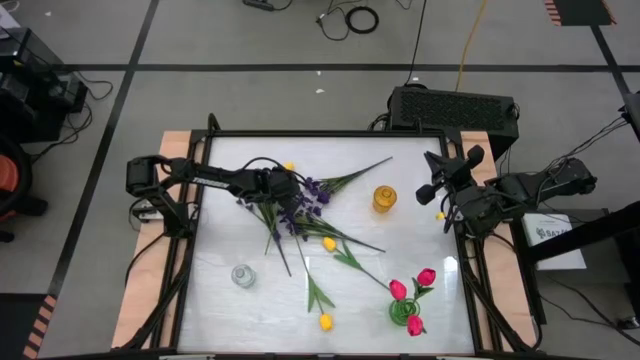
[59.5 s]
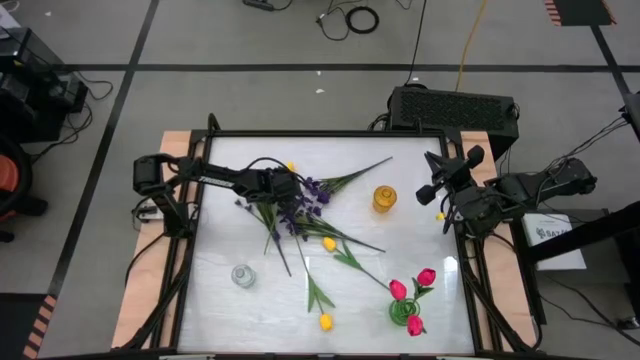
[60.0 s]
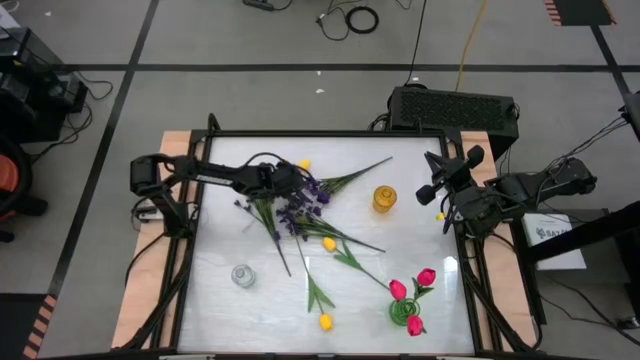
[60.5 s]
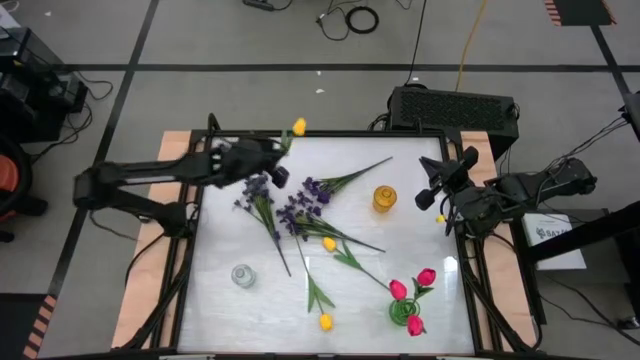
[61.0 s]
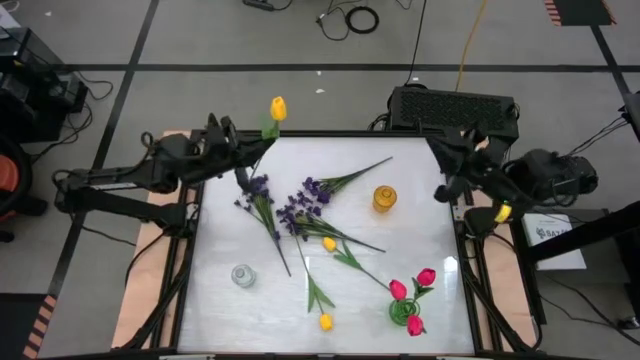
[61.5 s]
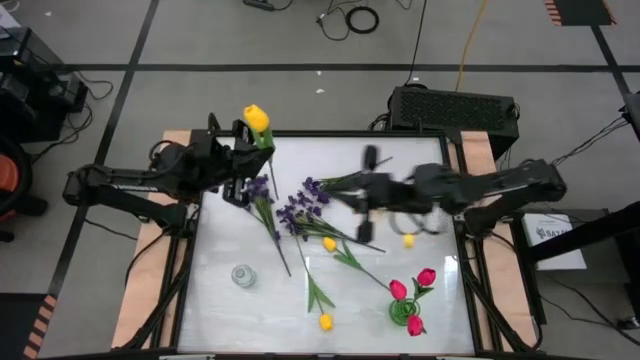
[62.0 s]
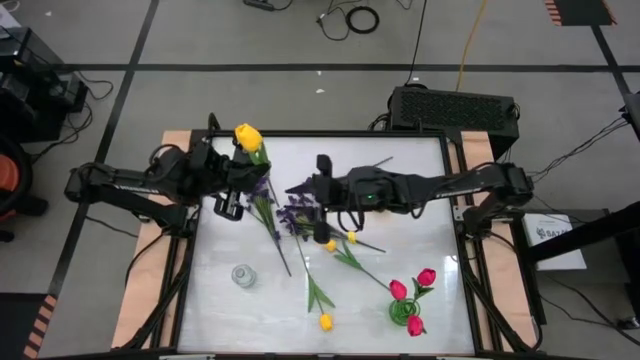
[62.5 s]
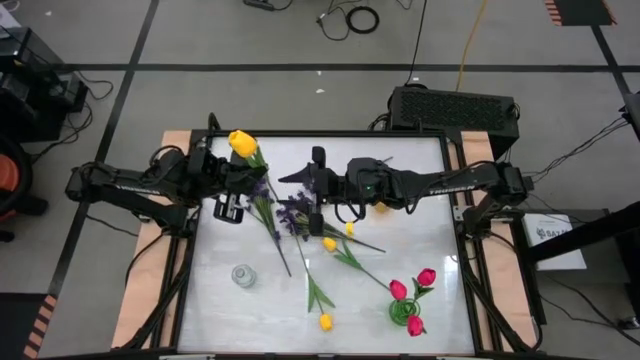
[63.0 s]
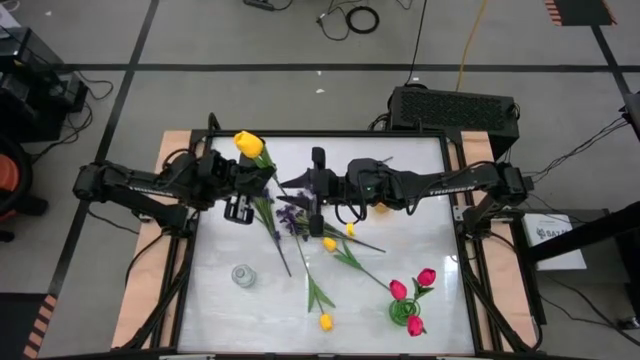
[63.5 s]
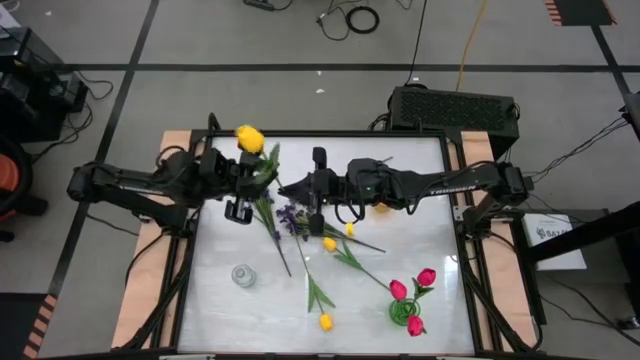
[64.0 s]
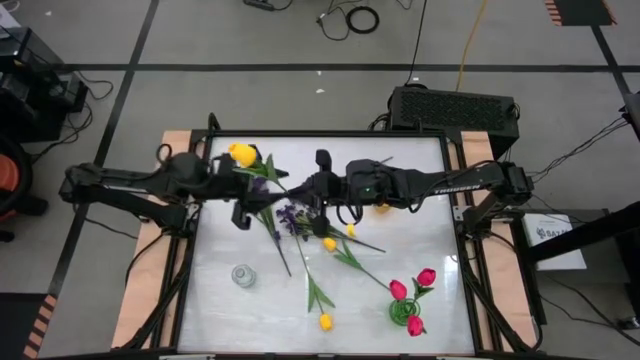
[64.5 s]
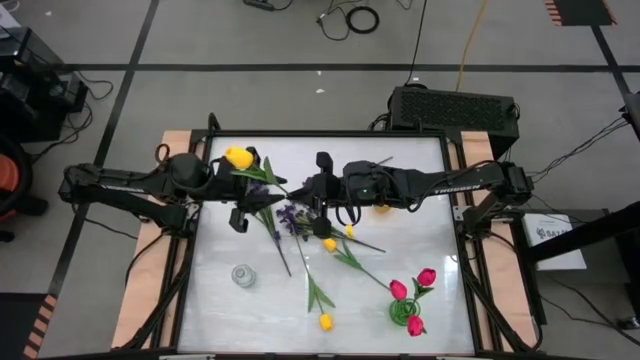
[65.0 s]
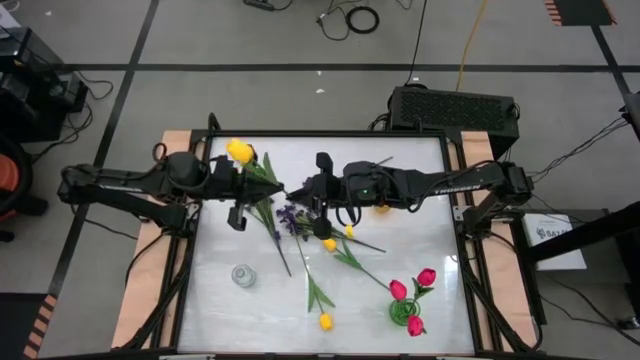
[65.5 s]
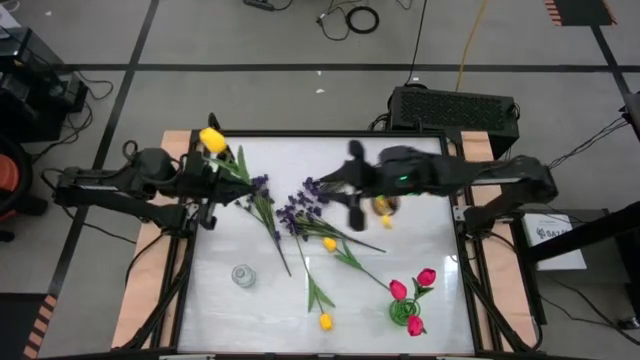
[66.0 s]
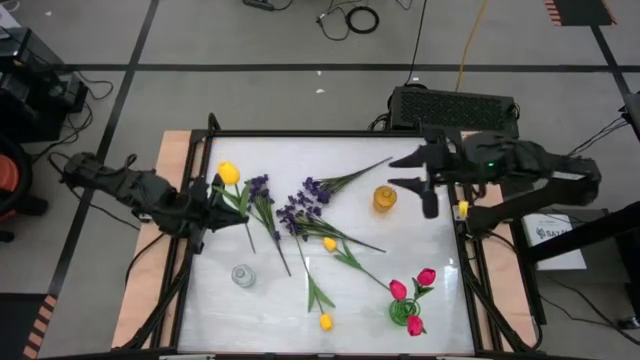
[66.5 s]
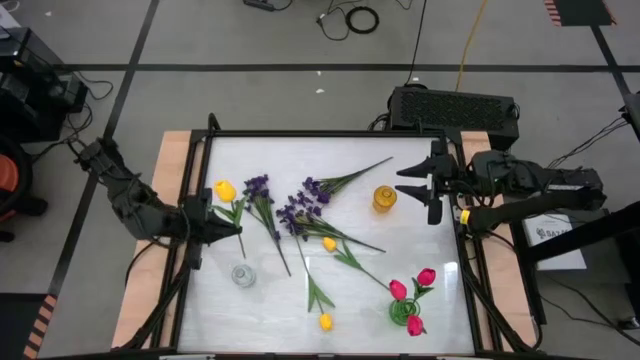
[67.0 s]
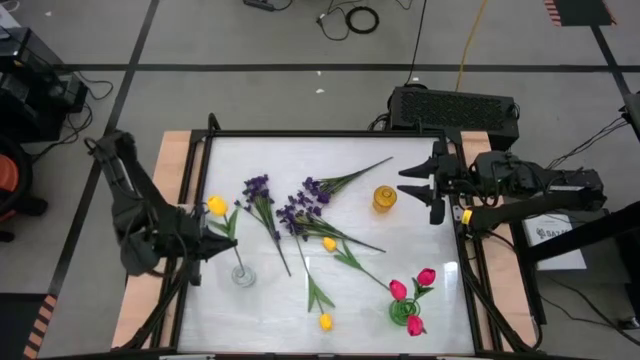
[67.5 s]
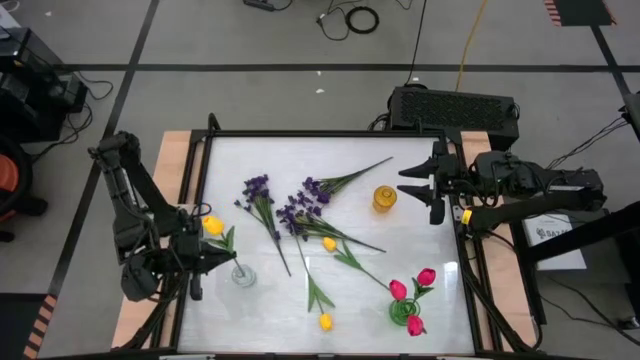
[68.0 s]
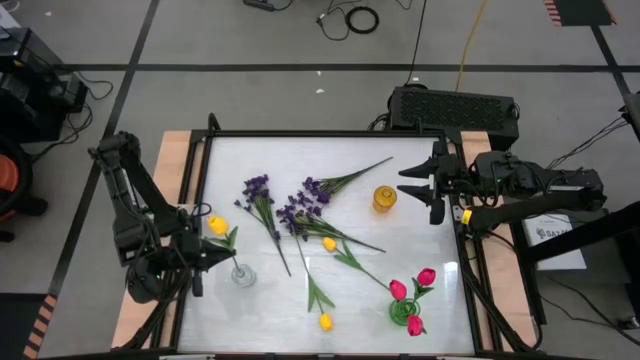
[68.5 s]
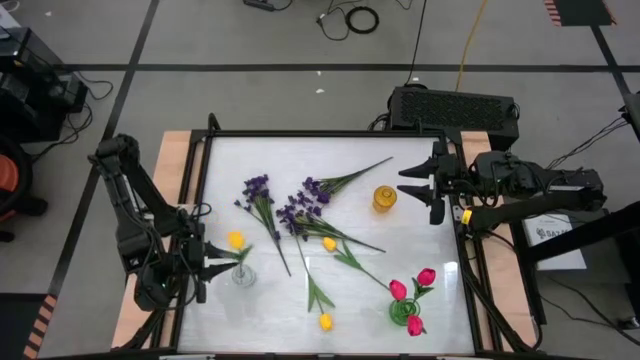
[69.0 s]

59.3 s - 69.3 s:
Task: Sort flowers into vase by color
Put the top left yellow flower into the transparent vase

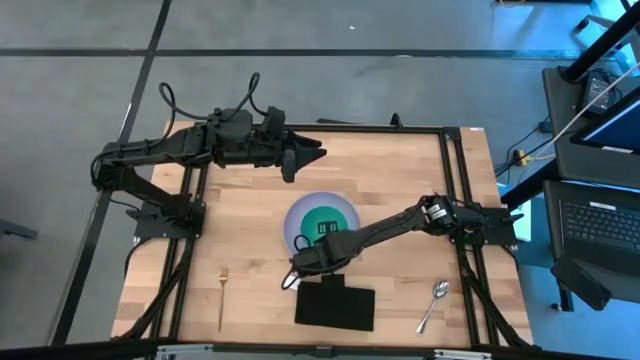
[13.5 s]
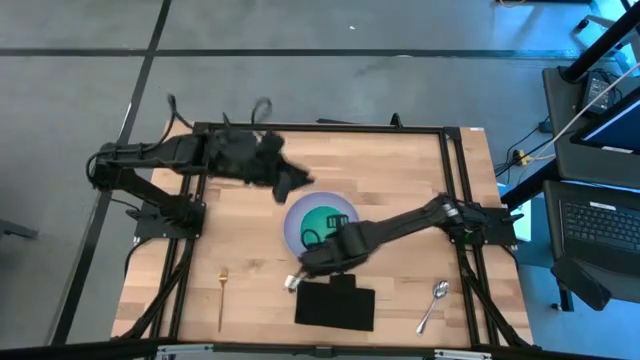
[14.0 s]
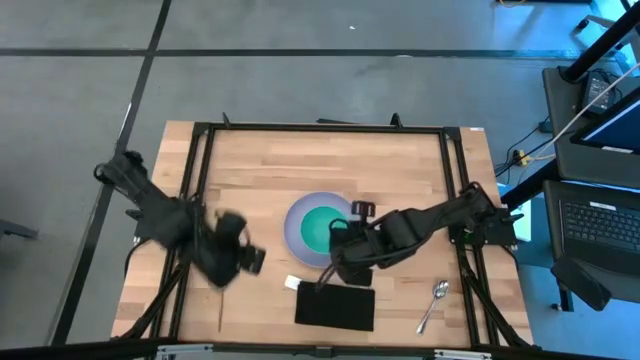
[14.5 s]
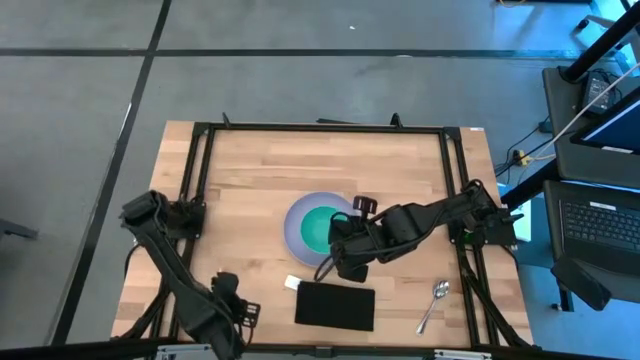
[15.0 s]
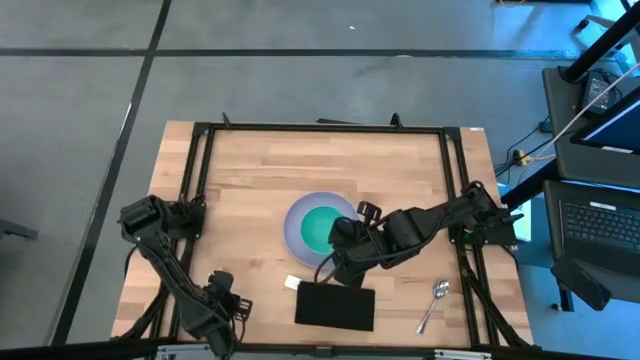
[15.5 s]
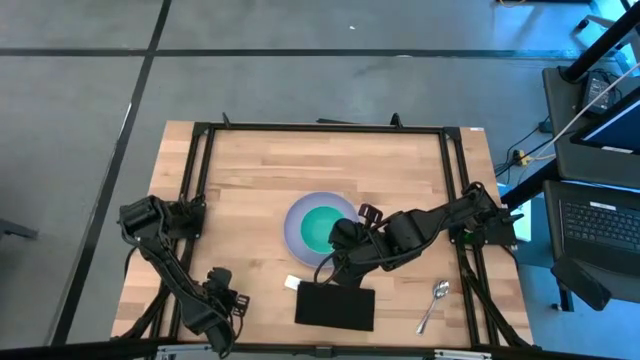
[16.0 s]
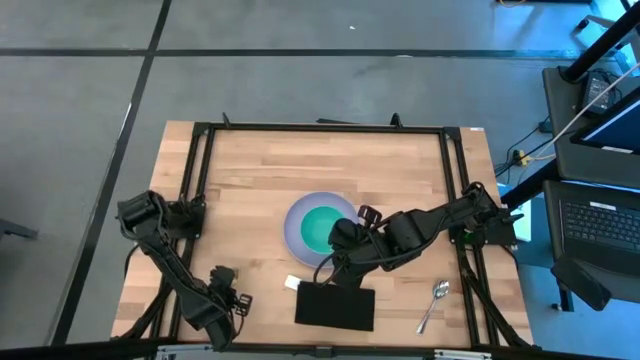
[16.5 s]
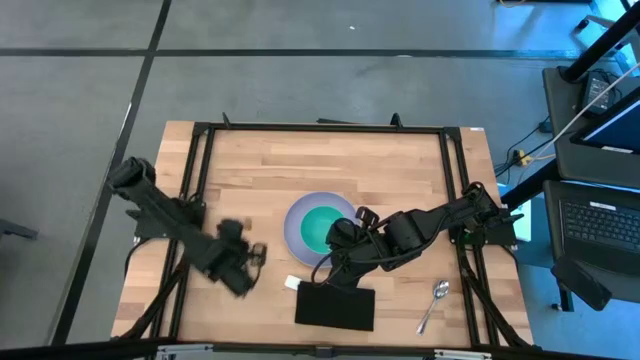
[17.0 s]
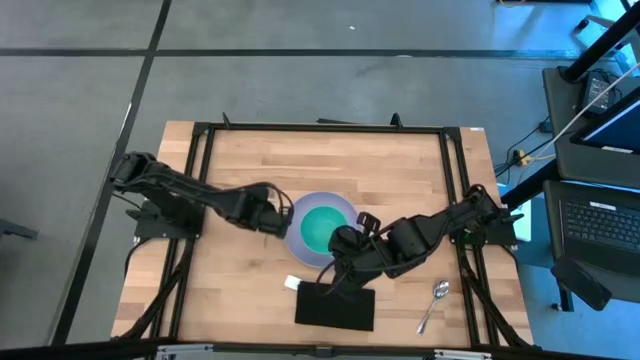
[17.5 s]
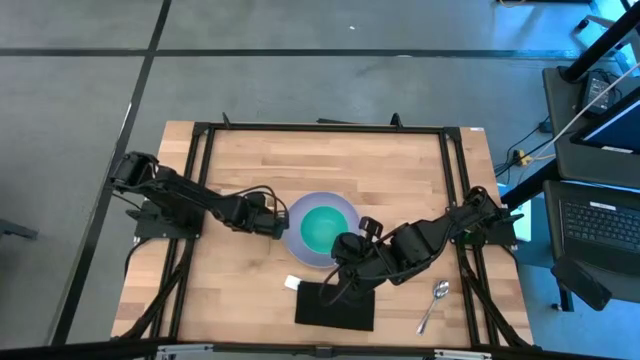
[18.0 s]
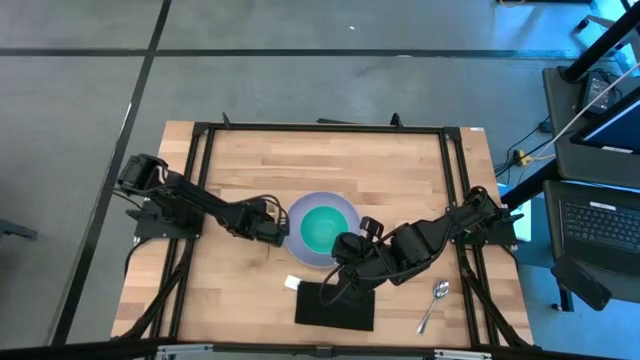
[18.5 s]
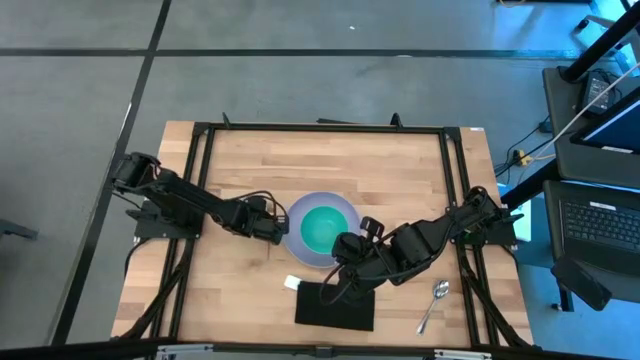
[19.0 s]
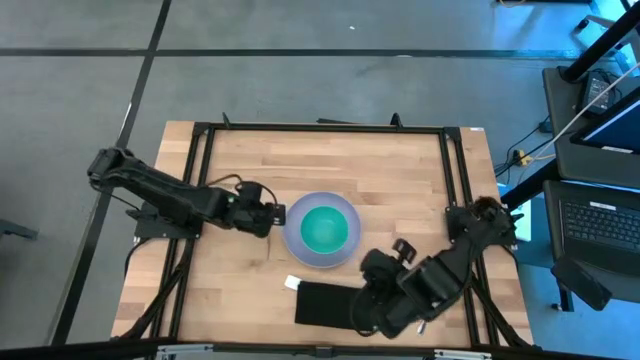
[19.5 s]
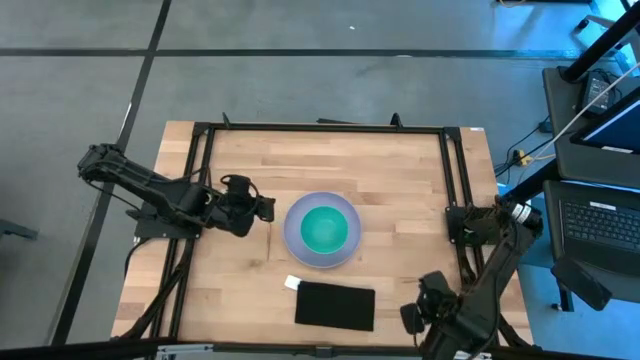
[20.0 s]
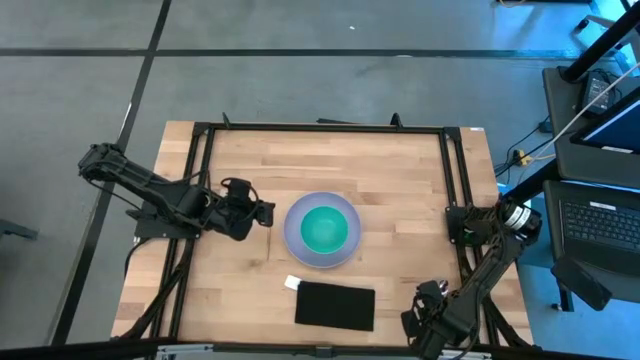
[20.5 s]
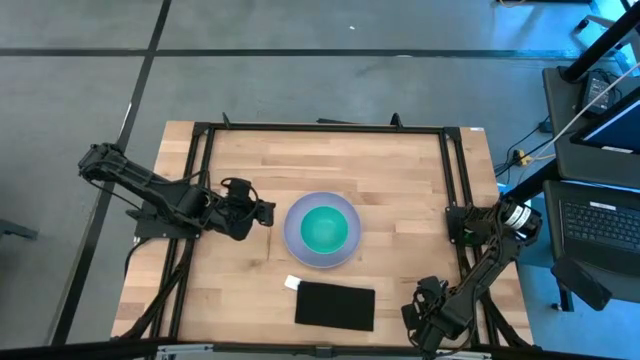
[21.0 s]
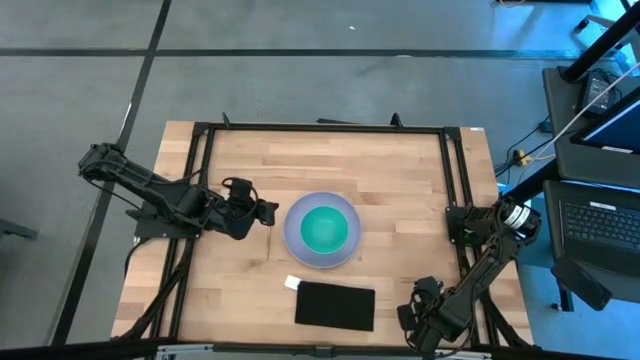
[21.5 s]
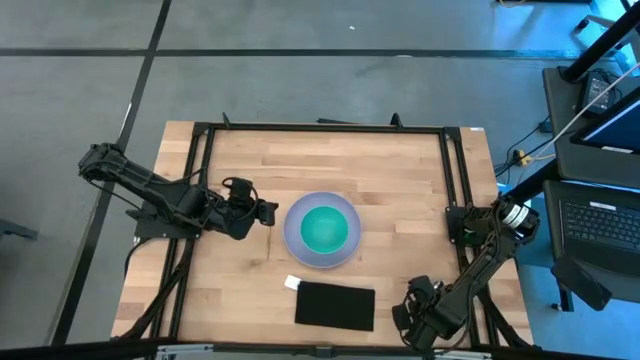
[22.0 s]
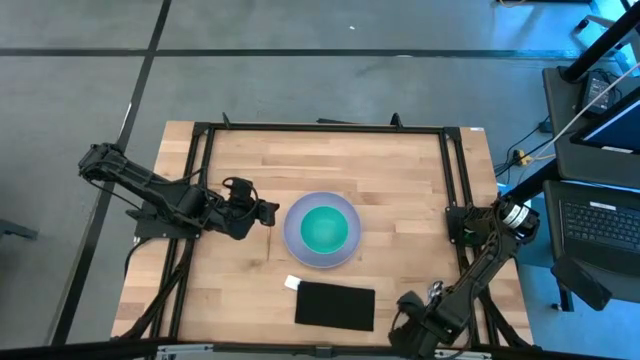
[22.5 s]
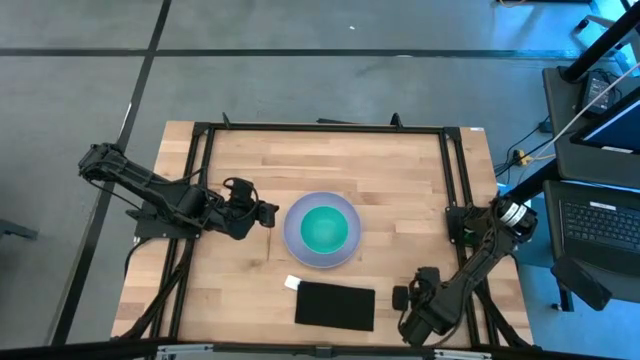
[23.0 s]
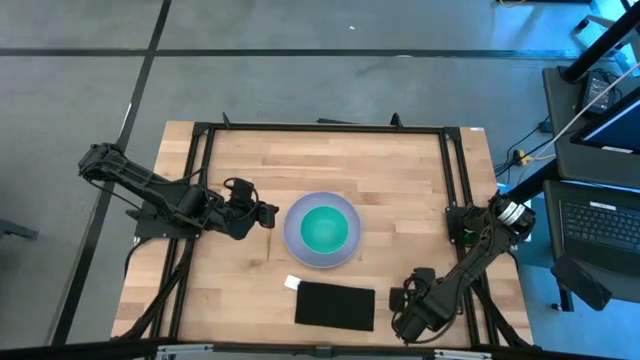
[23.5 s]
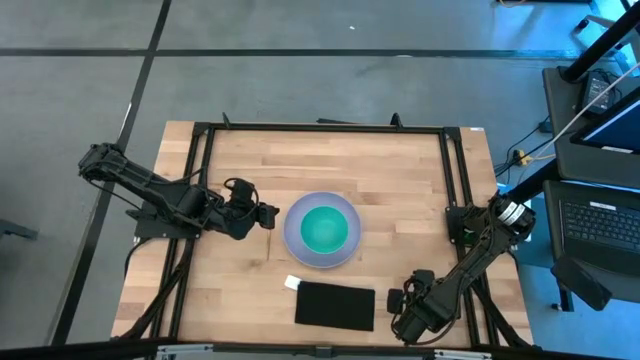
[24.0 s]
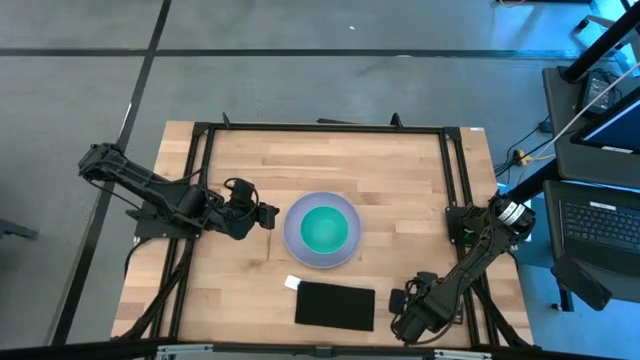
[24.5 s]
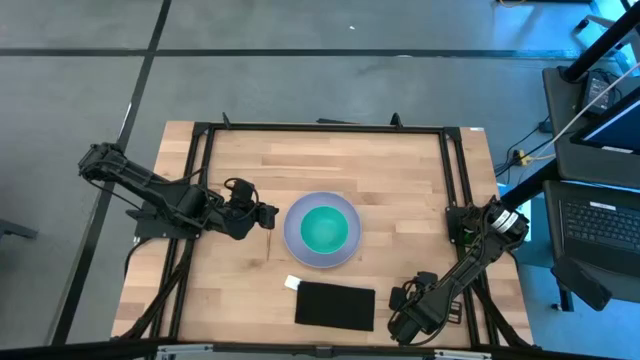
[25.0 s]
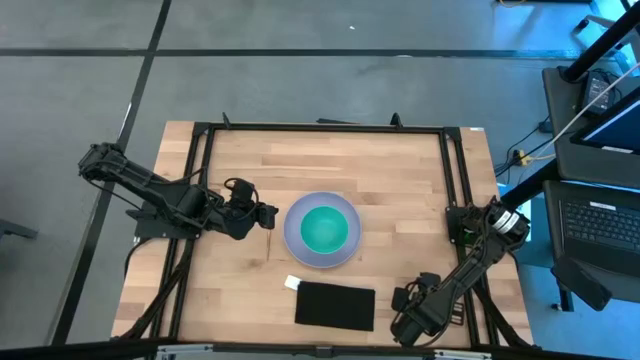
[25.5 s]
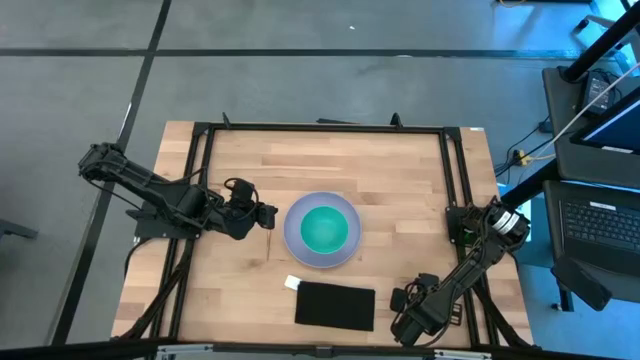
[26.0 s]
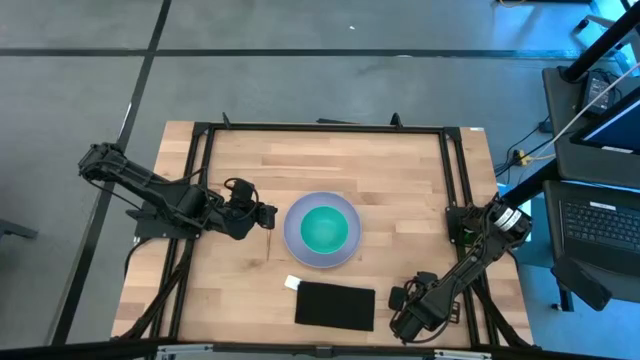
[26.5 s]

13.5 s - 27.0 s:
Task: Set table place
Stack the green bowl on top of the purple plate
